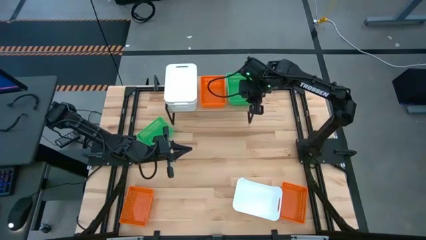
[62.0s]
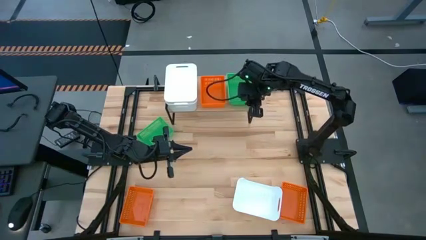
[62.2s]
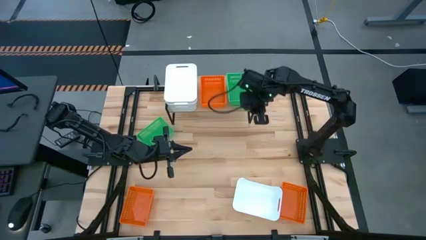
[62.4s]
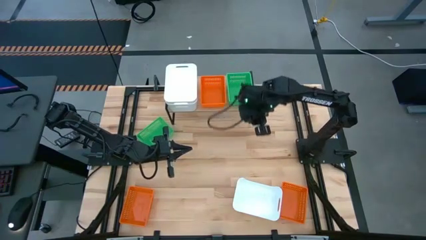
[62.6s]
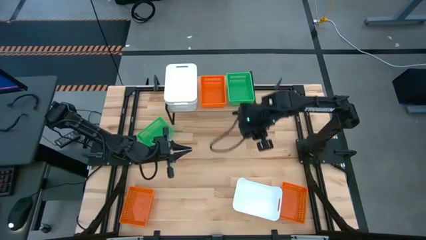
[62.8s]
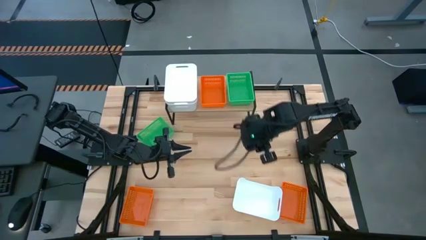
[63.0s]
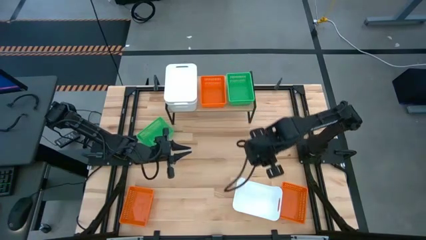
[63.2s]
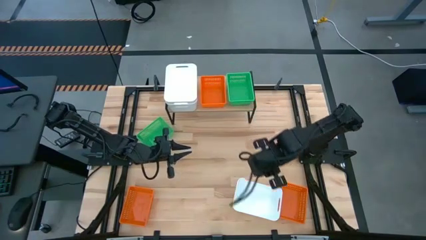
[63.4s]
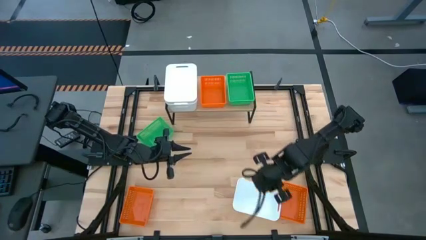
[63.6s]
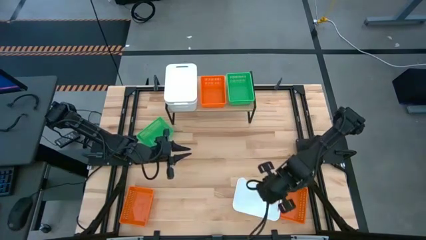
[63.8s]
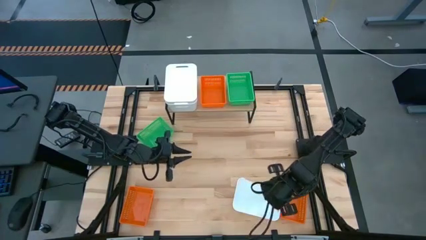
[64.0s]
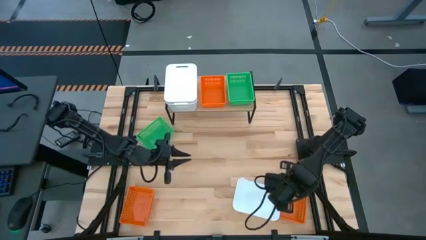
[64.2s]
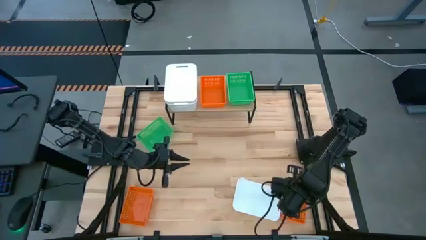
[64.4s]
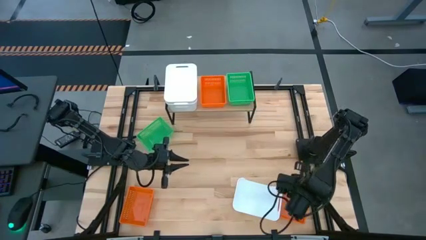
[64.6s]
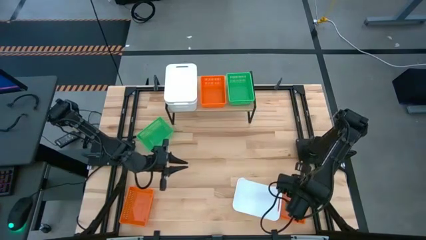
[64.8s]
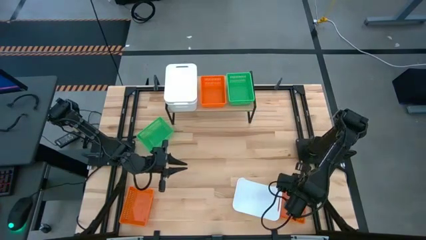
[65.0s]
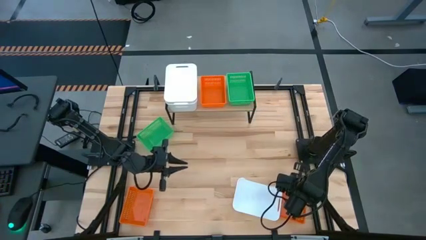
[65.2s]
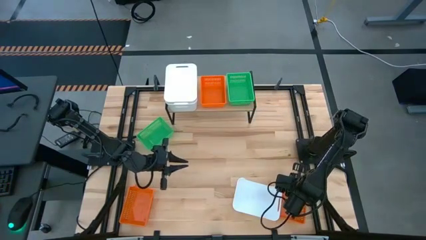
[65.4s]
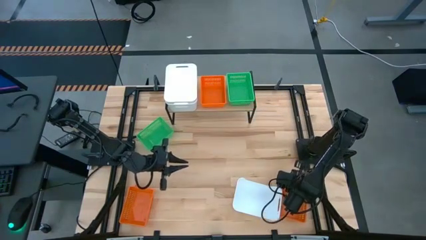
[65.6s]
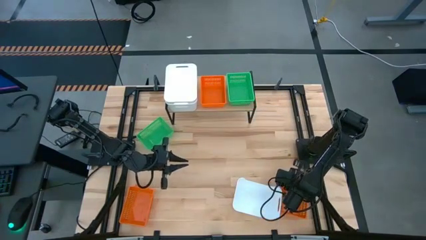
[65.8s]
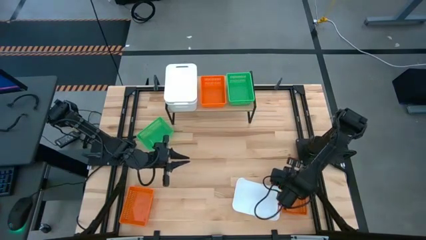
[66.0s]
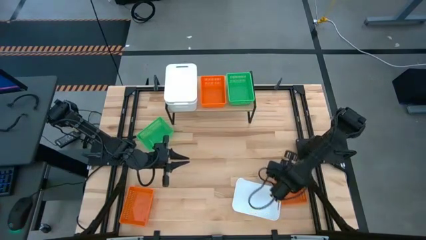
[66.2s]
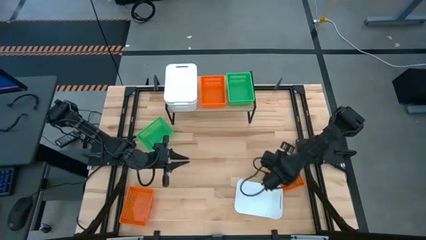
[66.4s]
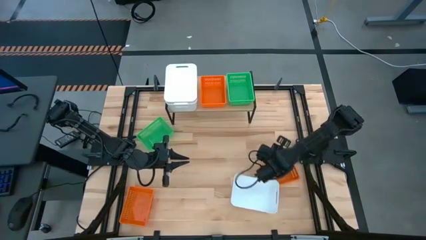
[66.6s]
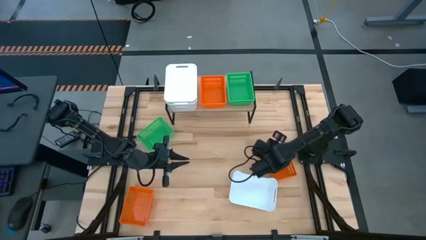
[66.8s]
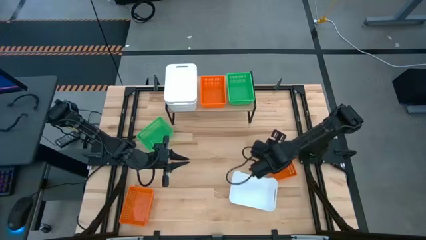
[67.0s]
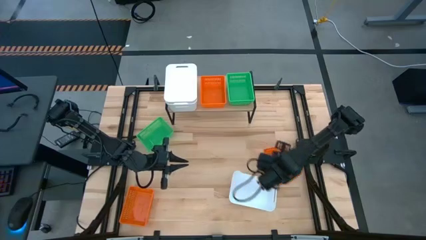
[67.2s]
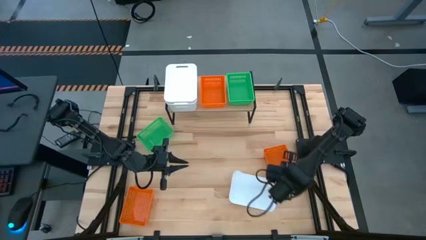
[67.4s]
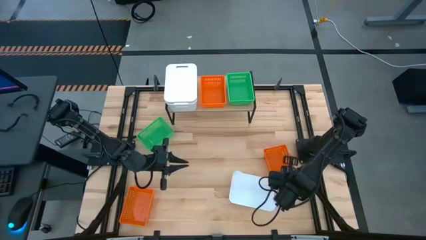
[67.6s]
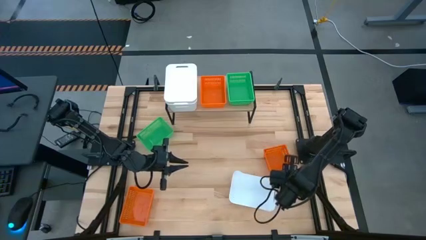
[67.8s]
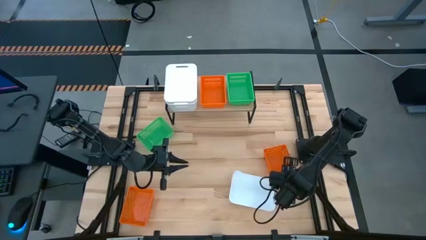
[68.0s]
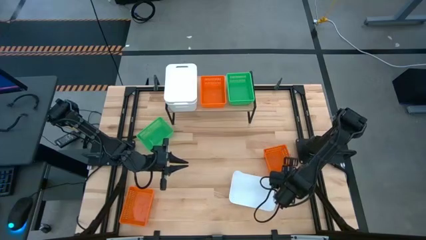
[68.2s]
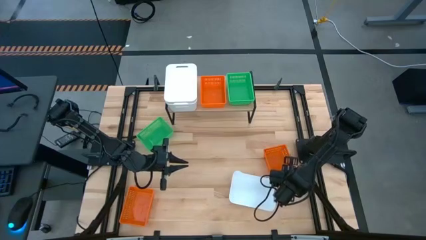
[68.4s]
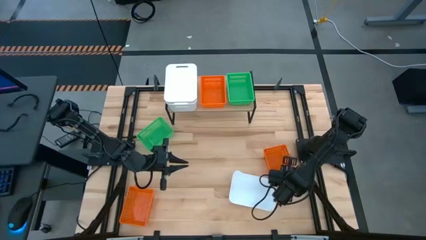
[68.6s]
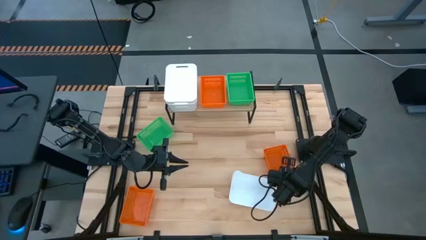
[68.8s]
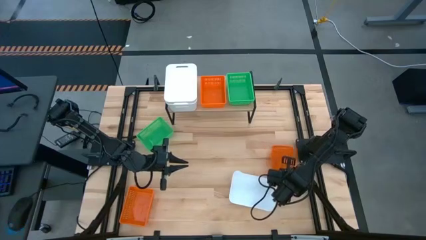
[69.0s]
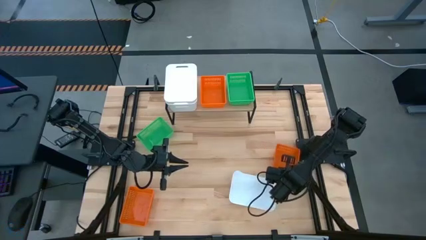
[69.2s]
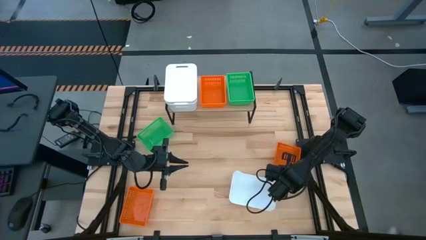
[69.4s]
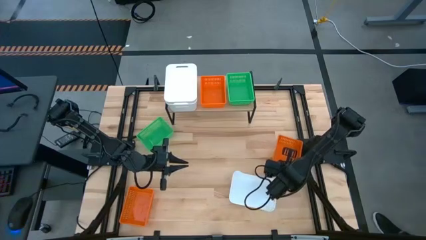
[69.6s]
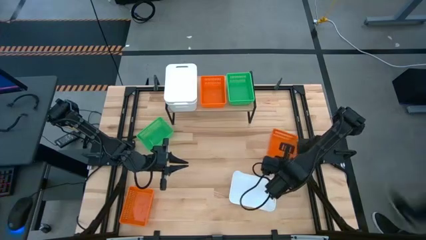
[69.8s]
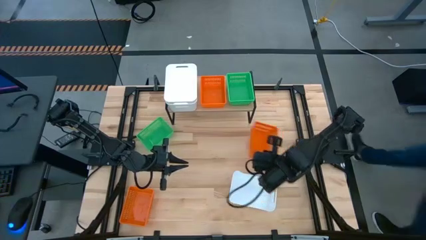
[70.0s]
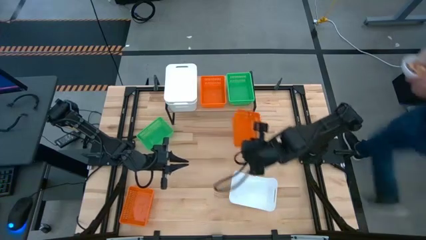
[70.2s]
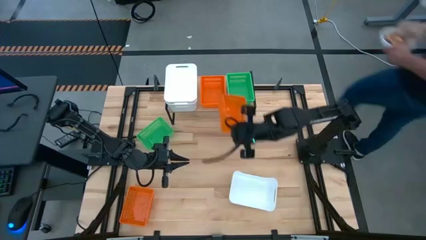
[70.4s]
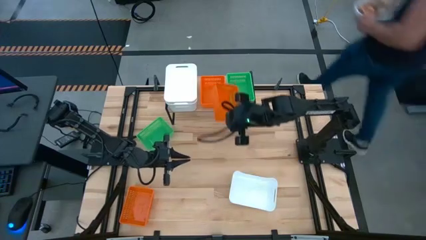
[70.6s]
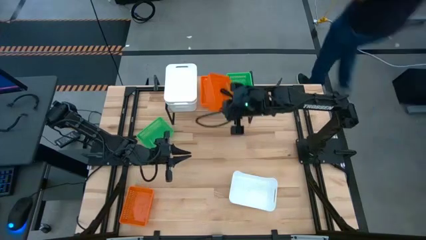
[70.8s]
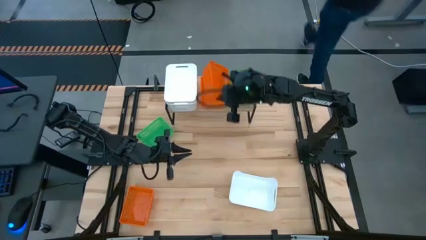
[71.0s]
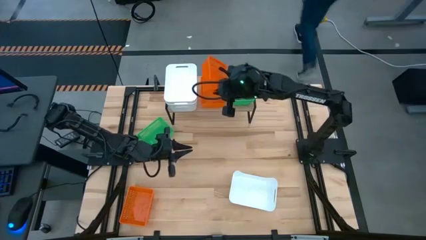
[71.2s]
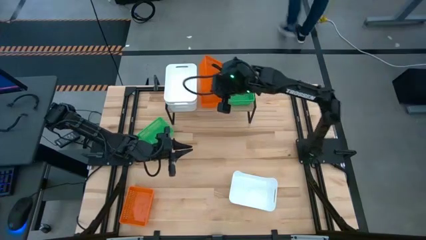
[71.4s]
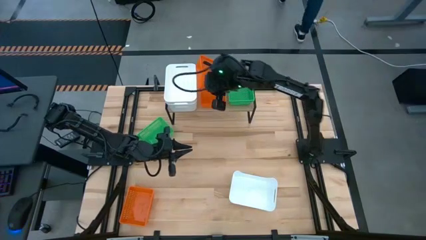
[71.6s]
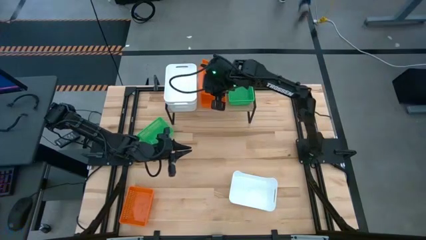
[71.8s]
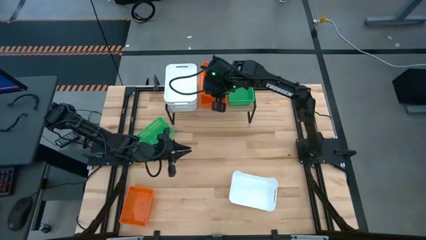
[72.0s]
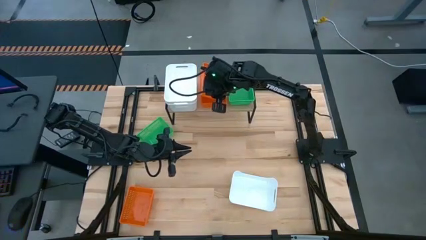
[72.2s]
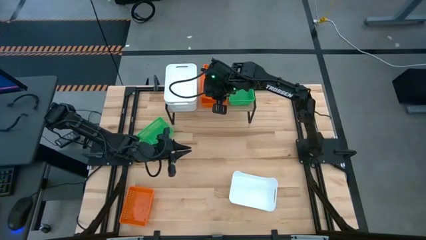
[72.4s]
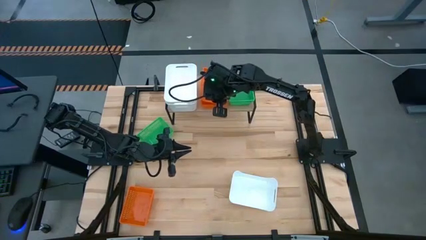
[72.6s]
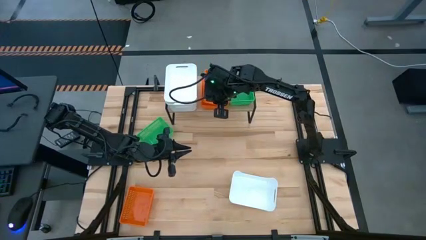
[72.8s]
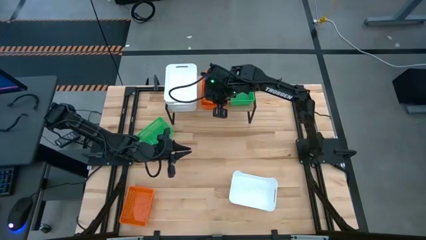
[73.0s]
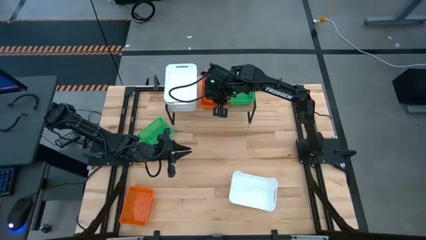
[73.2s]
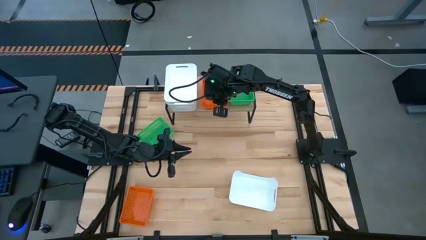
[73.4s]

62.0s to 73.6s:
Task: Stack baskets on shelf by color
Stack the right orange bin on top of the orange bin on the shelf

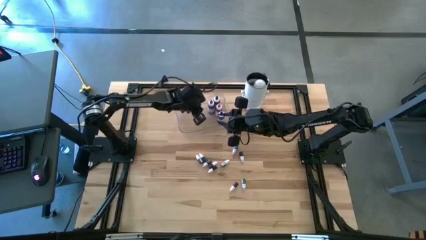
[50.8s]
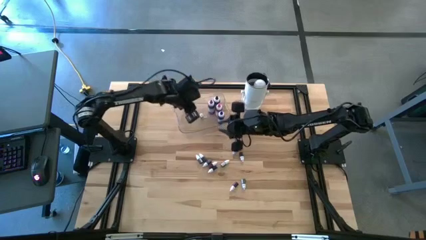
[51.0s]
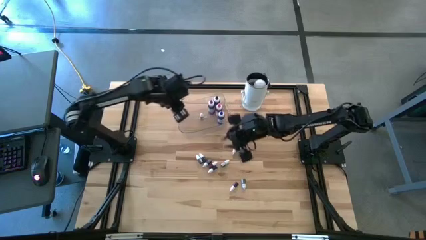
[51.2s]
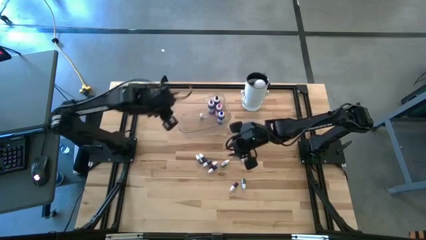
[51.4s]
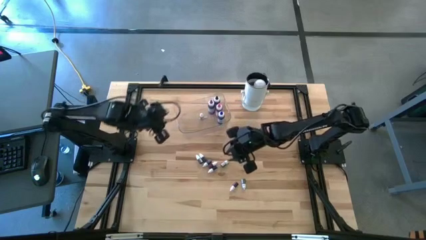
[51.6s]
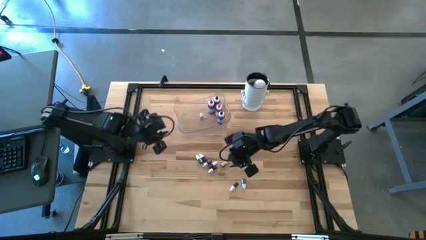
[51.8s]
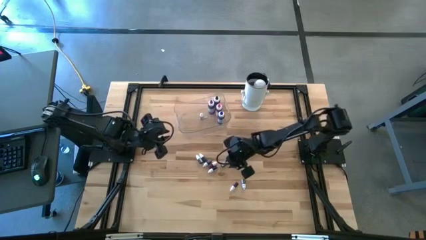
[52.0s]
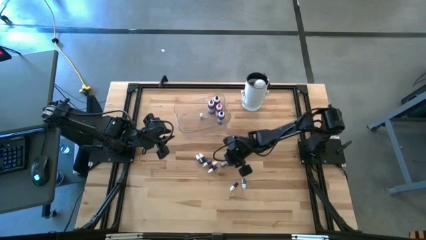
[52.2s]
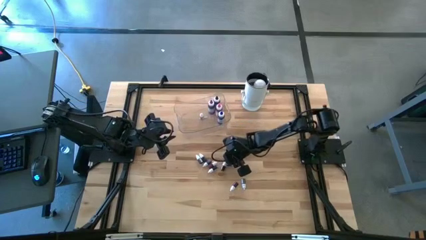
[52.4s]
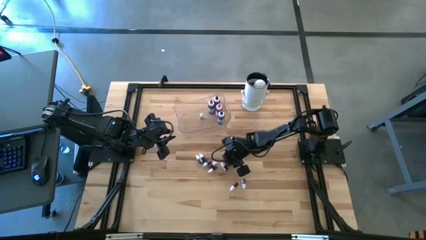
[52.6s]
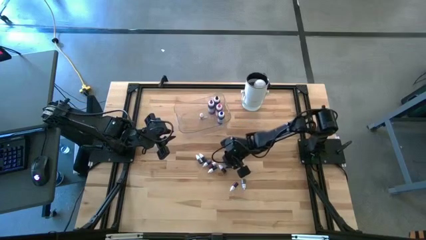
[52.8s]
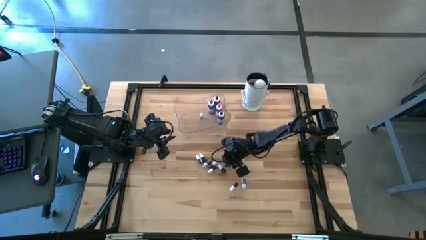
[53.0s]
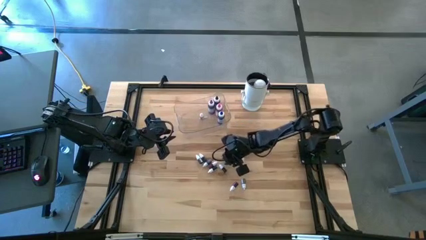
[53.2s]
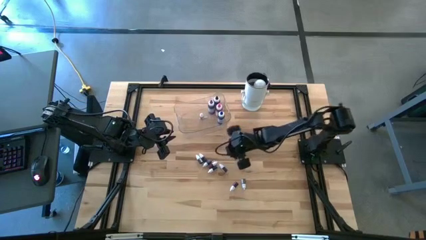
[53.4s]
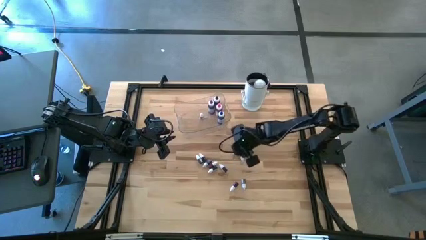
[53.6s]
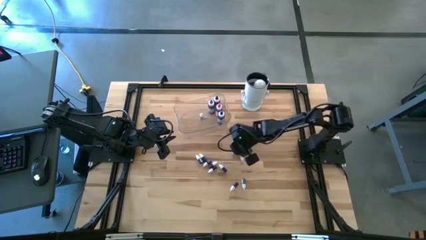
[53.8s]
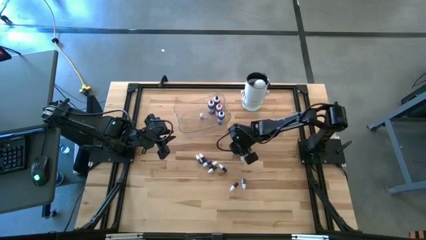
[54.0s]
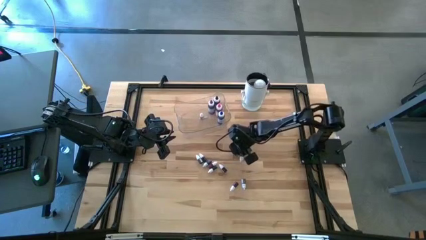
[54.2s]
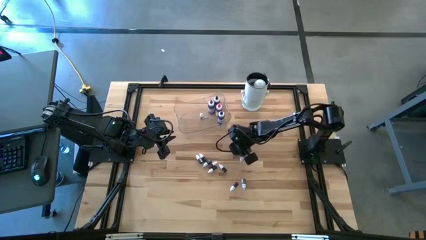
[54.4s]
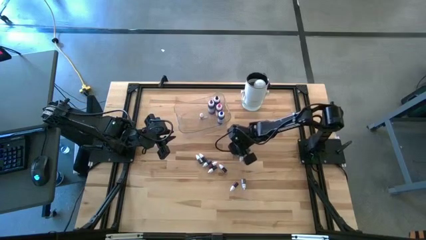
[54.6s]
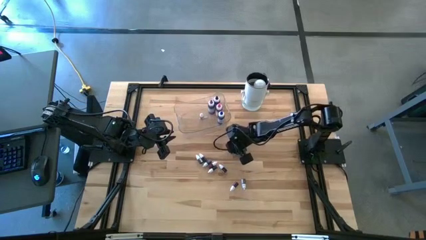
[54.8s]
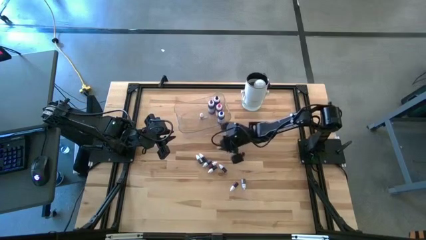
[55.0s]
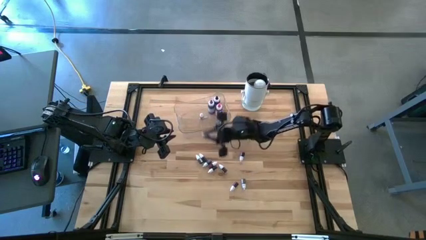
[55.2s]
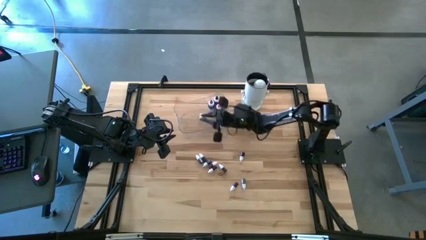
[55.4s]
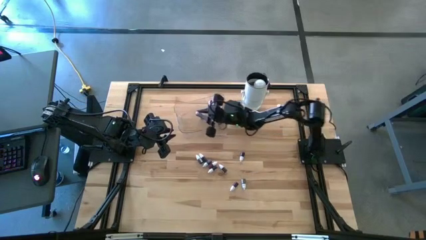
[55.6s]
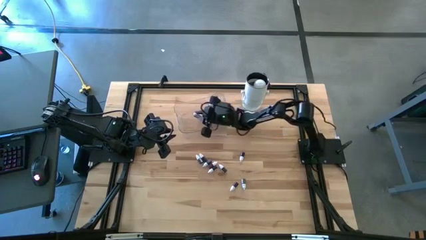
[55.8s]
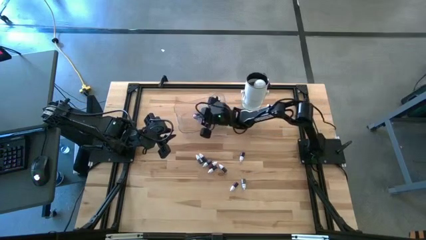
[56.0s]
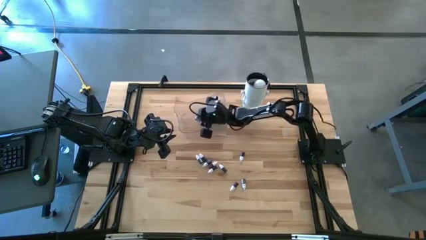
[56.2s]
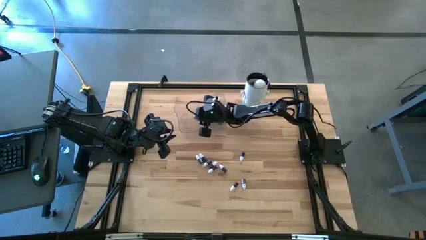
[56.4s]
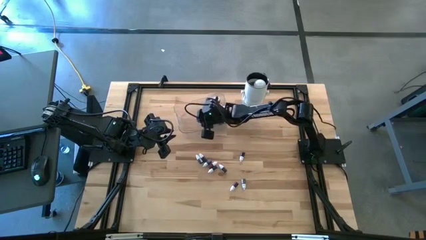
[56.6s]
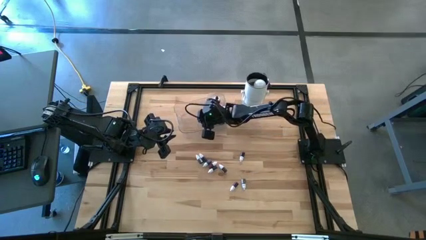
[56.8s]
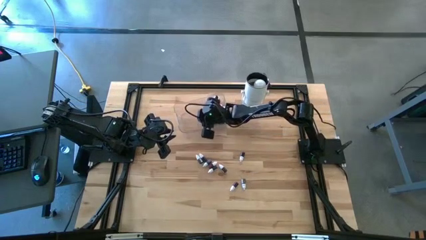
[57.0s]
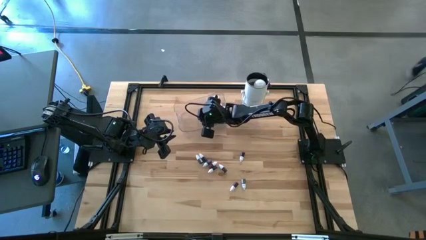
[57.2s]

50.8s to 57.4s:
Task: Pick & Place food coloring
Put the small blue food coloring bottle into the transparent container
